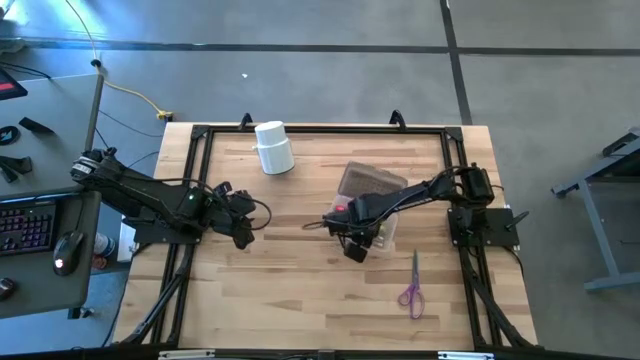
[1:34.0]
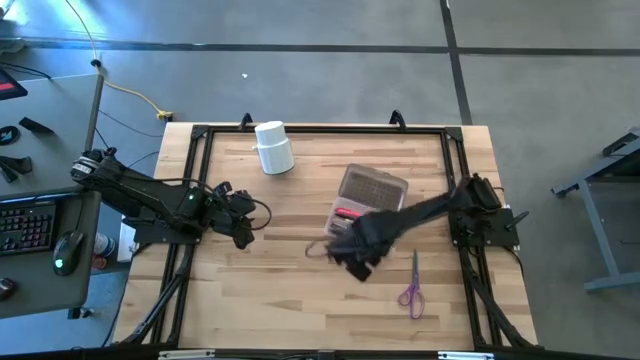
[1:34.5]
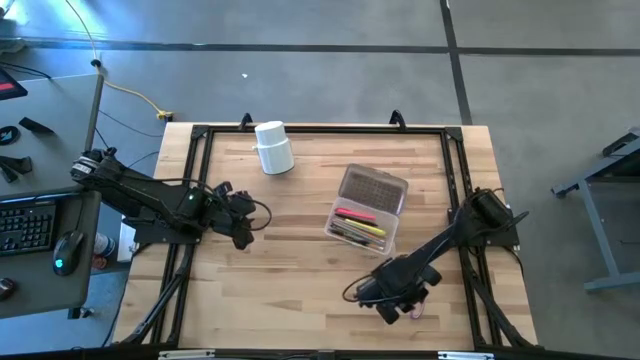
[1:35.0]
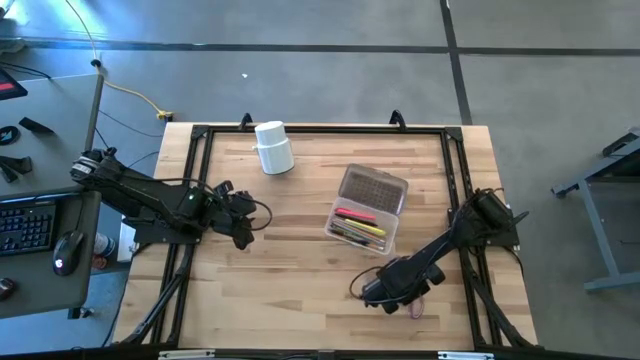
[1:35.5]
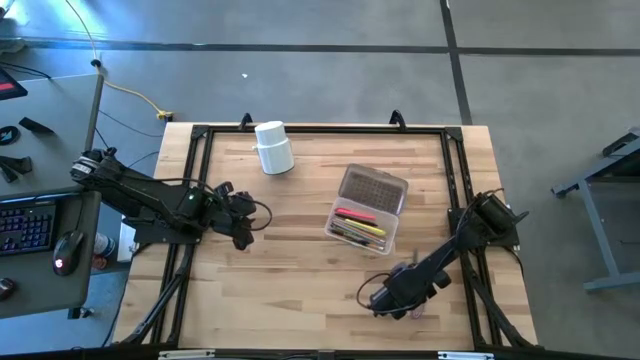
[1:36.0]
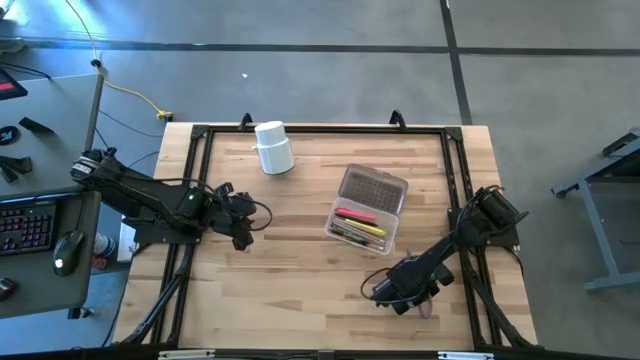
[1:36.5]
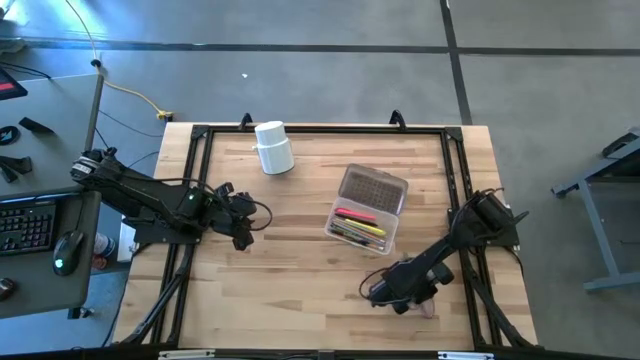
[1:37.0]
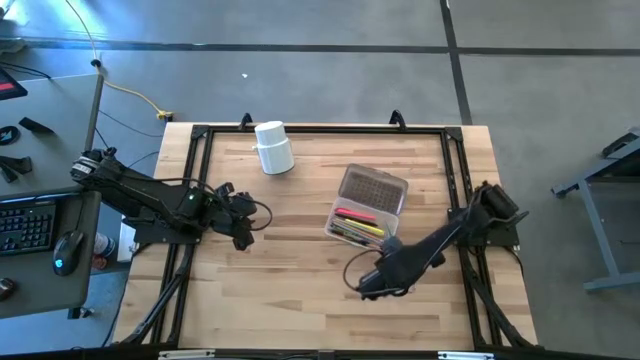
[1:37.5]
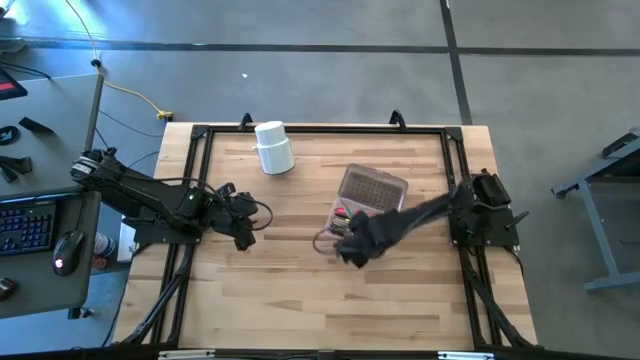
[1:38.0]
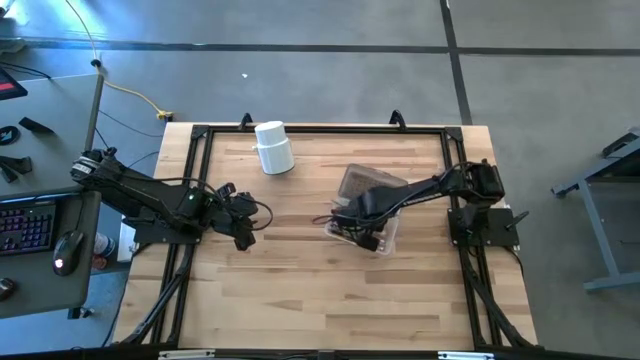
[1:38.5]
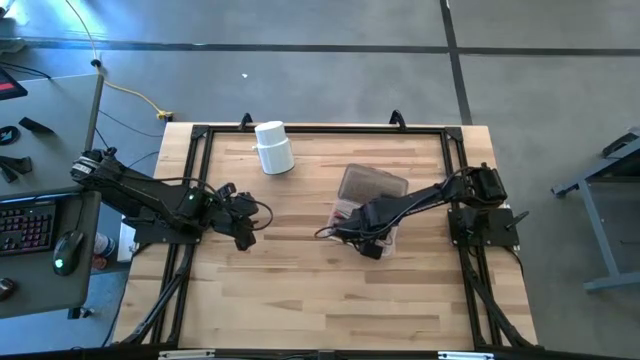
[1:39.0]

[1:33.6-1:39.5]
Task: Pick & place school supplies into a supply box
Put the violet scissors into the supply box

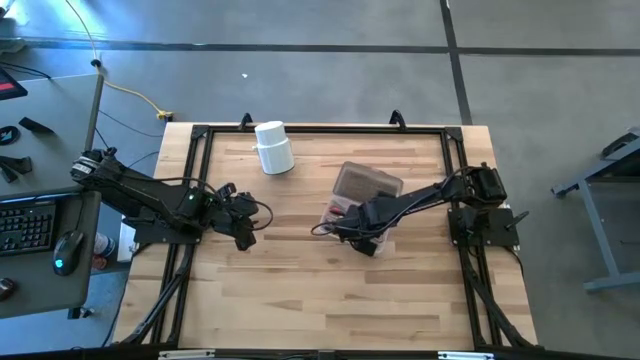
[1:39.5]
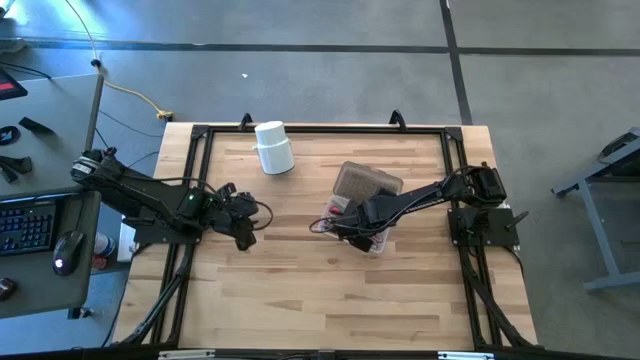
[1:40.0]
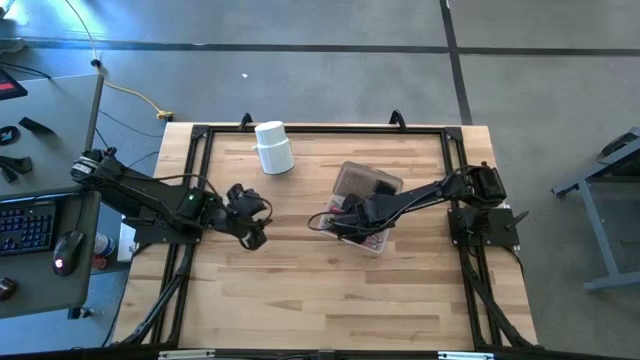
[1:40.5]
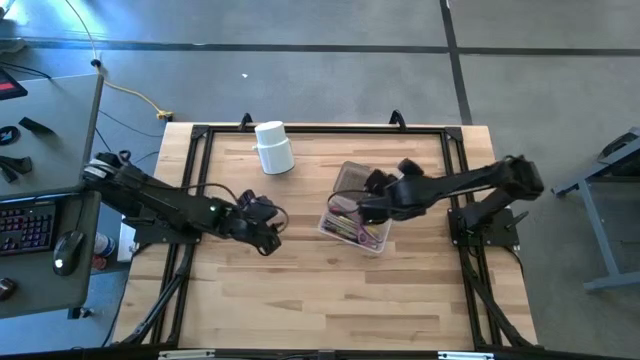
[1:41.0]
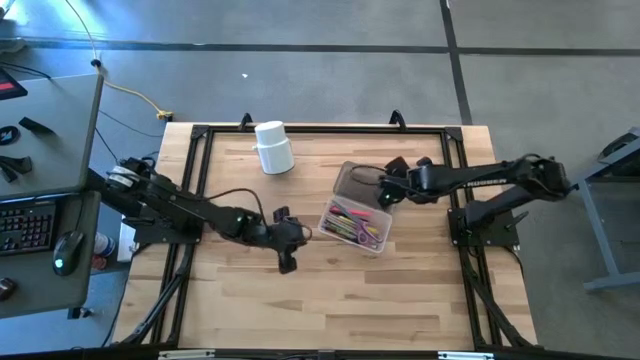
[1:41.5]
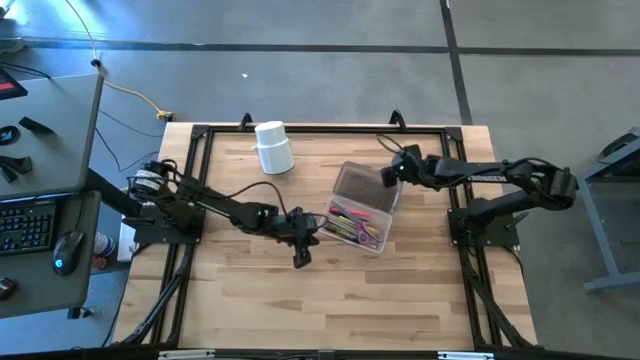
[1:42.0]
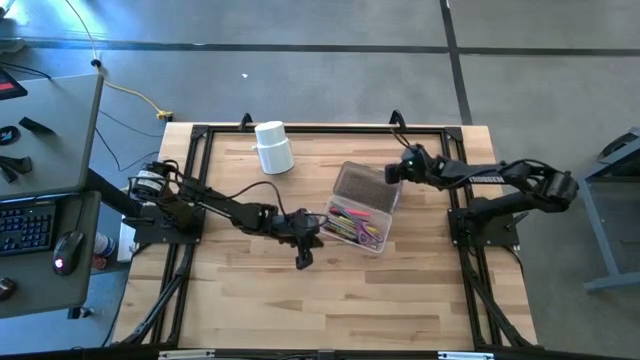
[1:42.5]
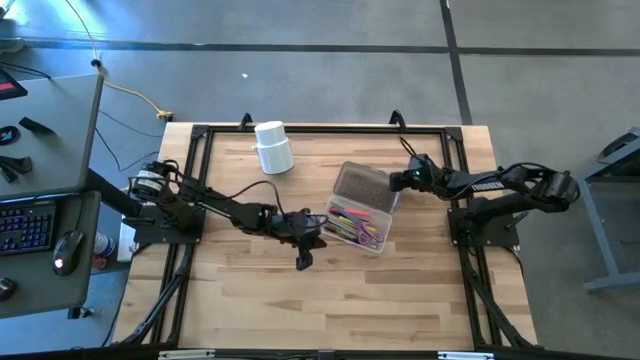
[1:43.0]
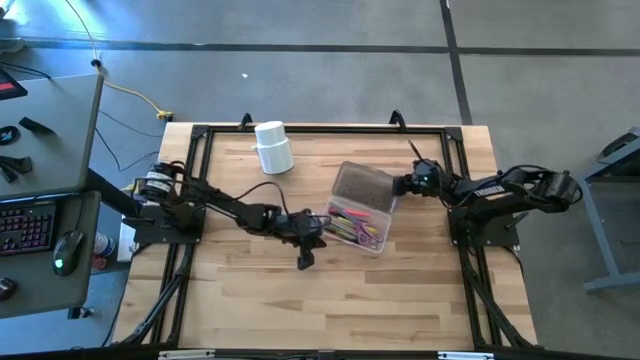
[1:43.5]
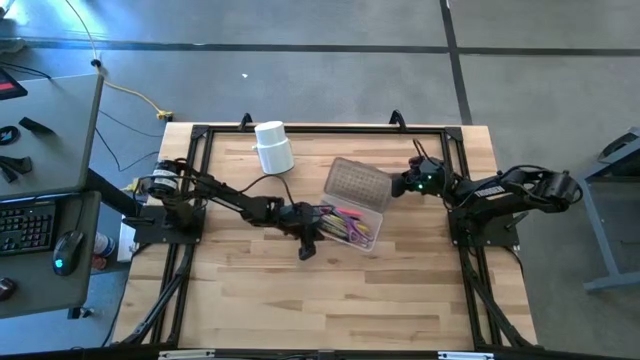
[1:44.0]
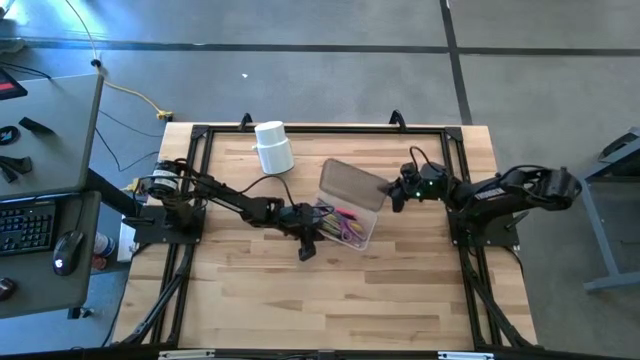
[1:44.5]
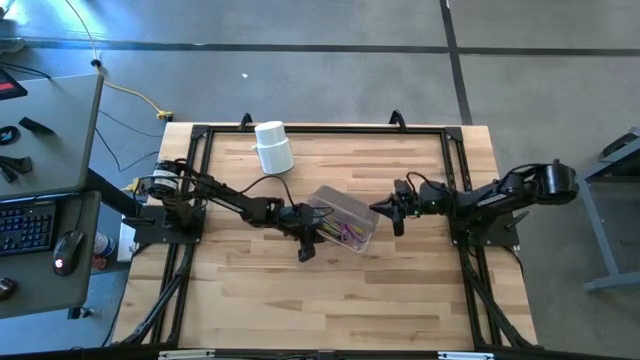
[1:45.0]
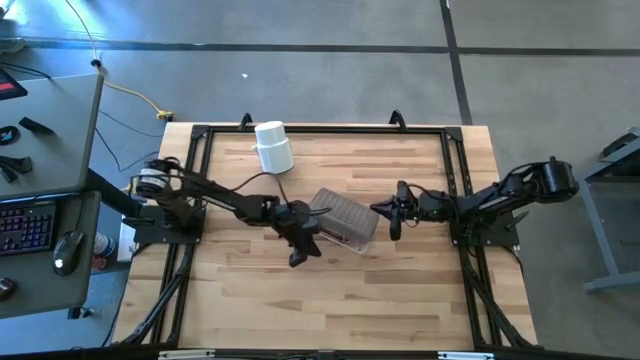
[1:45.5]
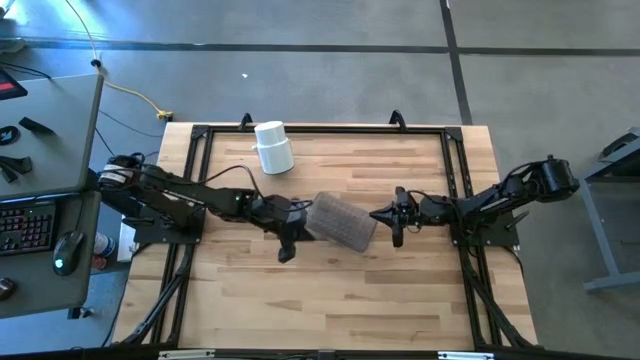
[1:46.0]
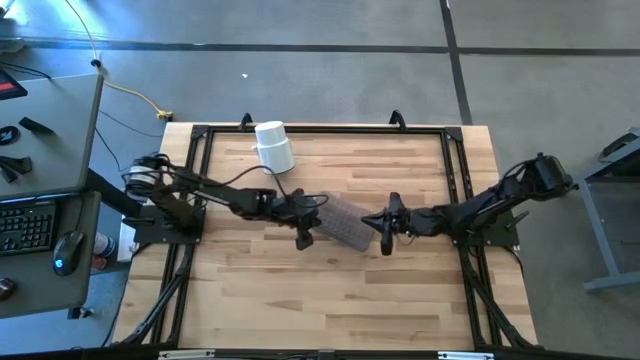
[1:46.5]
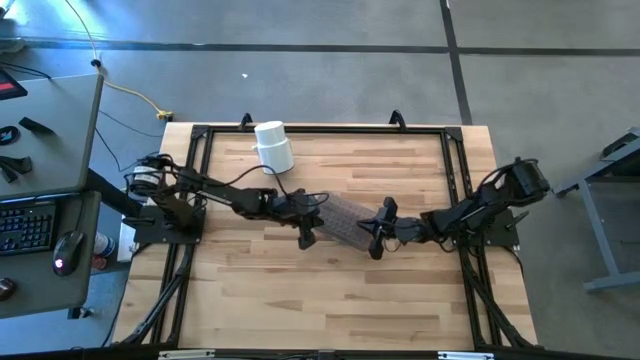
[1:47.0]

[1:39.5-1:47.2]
Close the supply box

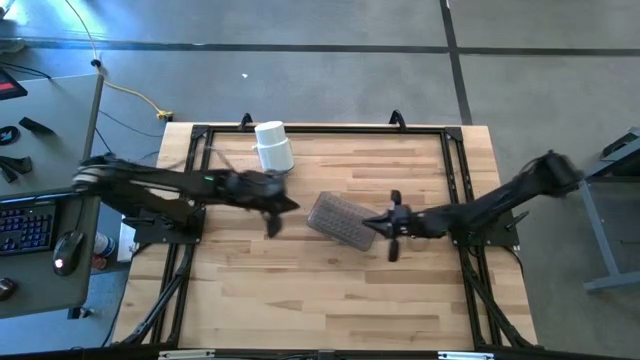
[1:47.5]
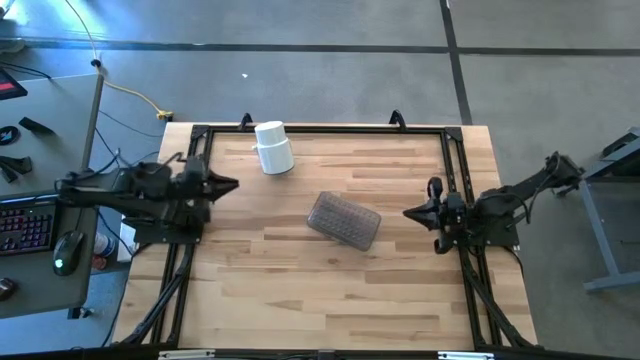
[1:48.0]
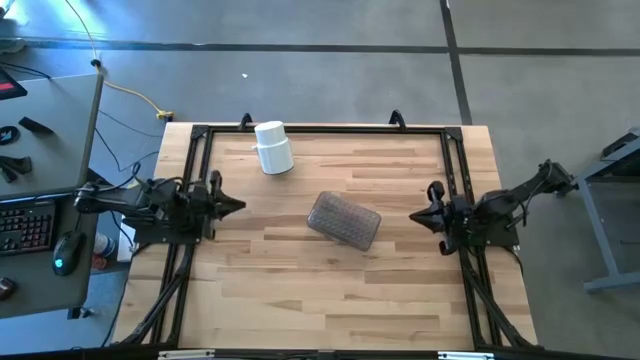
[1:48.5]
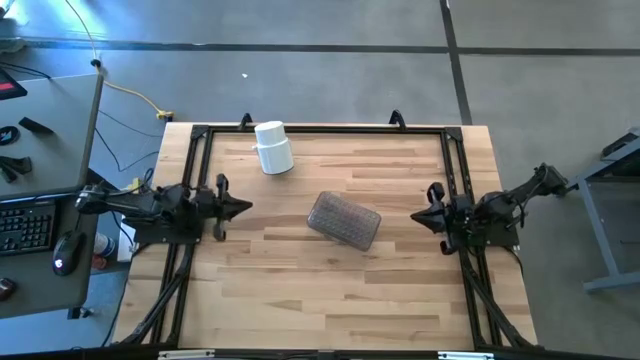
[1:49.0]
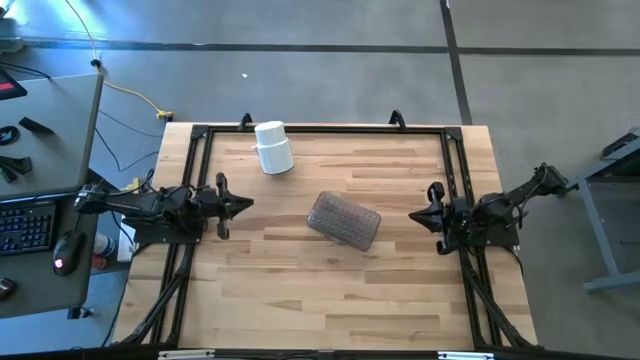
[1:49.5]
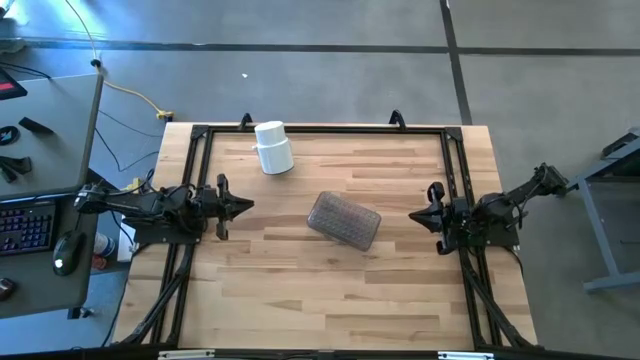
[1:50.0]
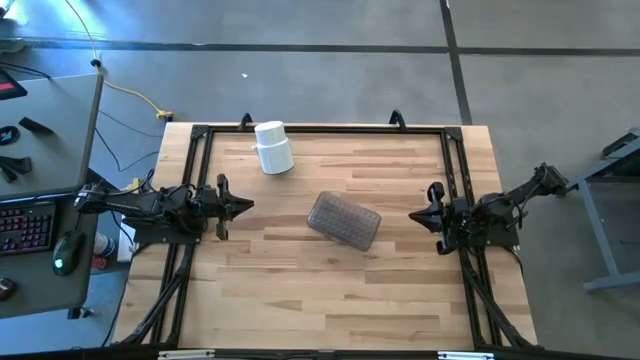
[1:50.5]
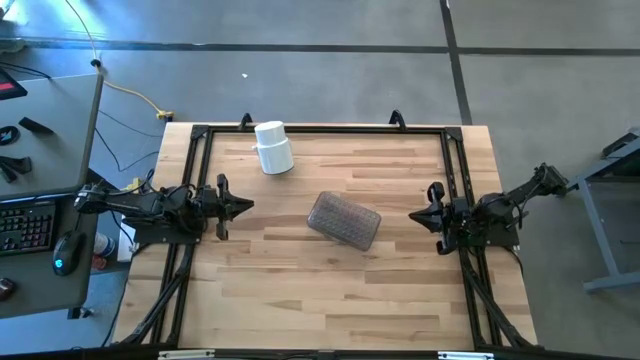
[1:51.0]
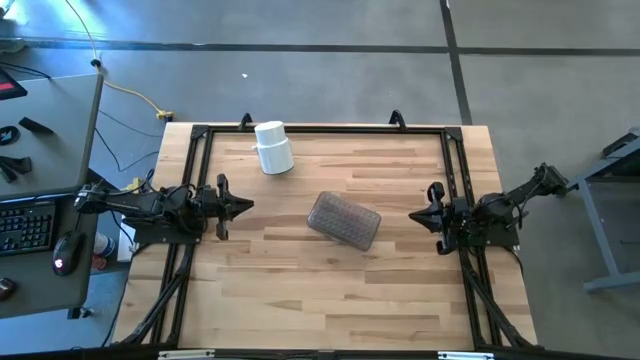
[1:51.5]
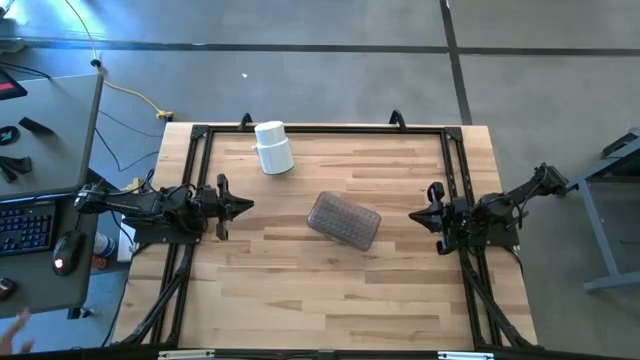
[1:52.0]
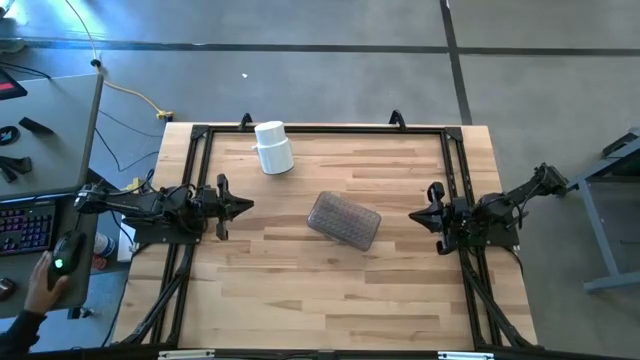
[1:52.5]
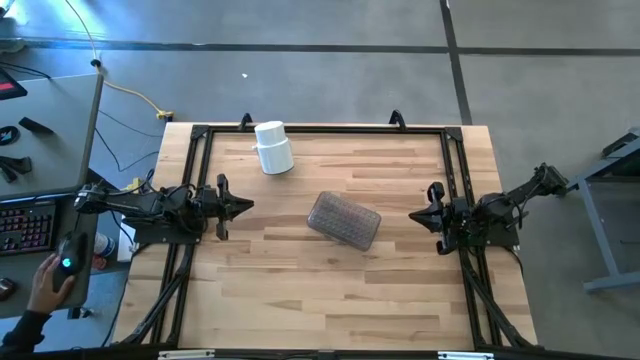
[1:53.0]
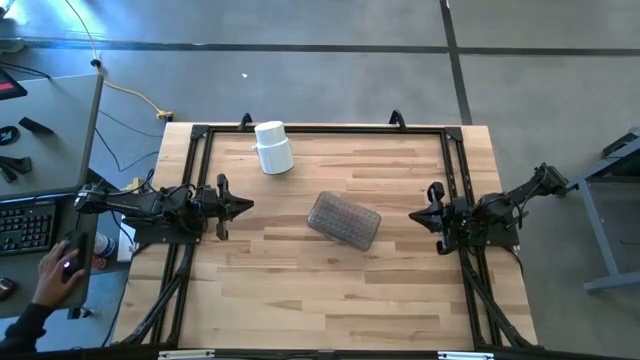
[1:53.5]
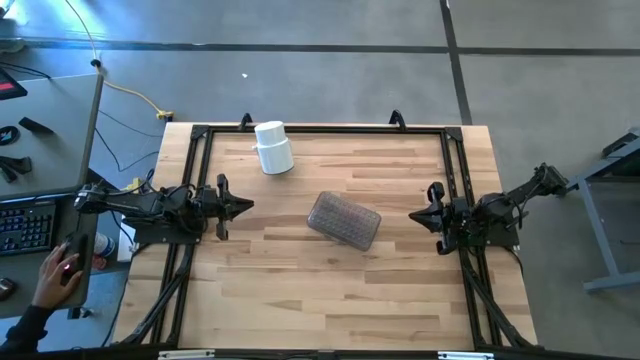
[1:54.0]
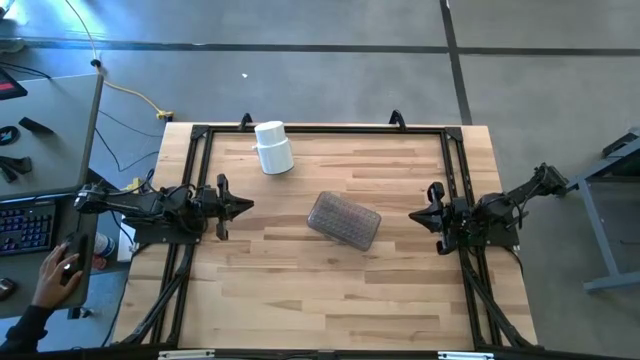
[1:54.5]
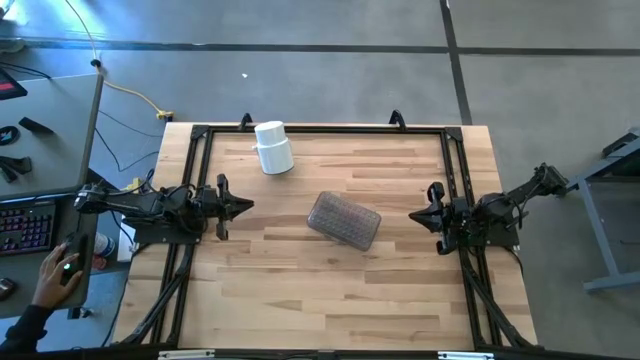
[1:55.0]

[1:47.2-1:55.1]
Return to Home Position
